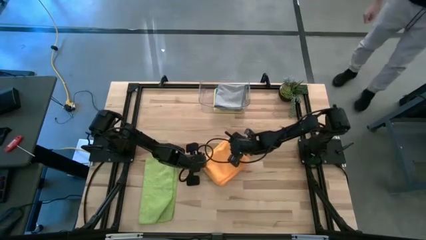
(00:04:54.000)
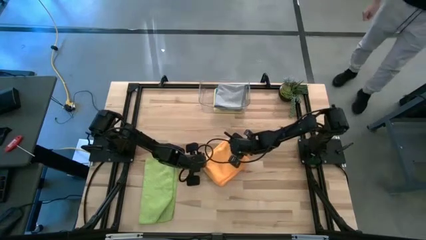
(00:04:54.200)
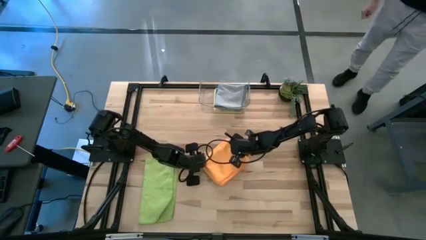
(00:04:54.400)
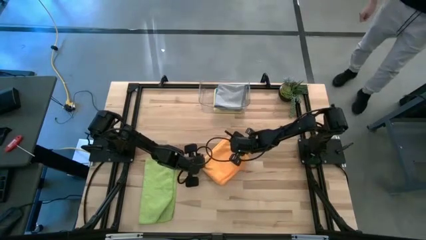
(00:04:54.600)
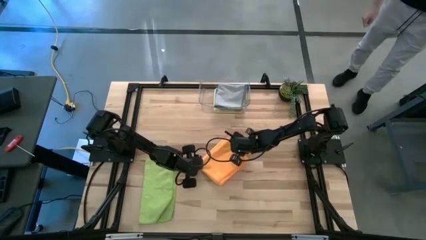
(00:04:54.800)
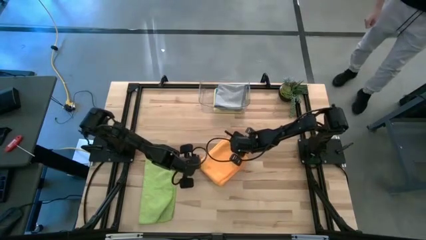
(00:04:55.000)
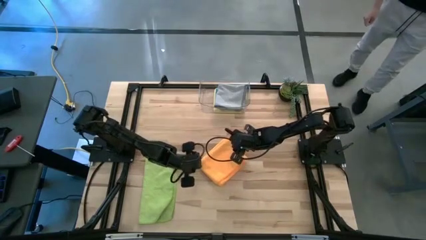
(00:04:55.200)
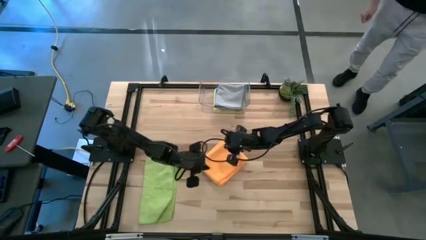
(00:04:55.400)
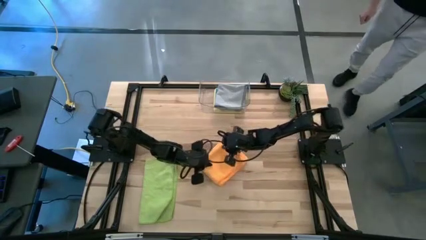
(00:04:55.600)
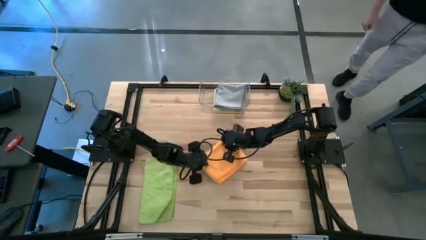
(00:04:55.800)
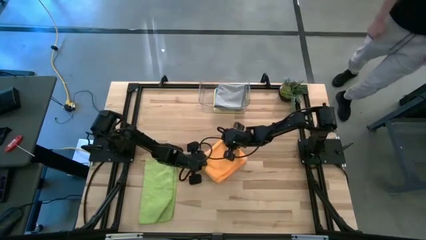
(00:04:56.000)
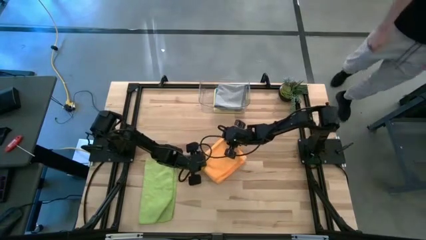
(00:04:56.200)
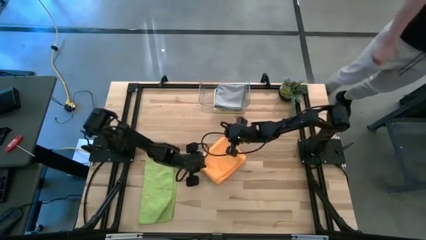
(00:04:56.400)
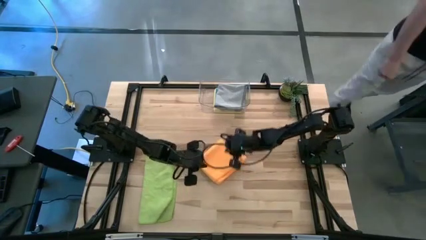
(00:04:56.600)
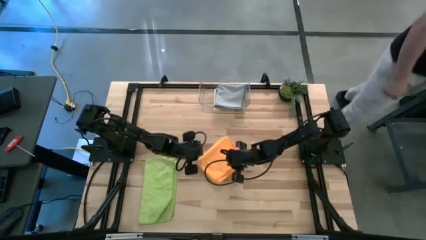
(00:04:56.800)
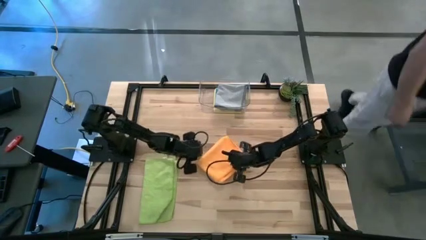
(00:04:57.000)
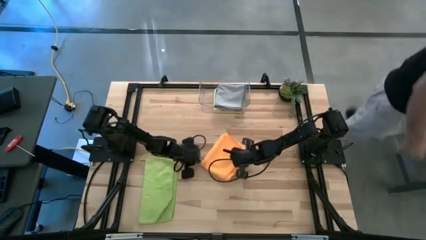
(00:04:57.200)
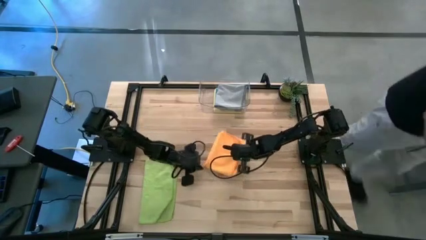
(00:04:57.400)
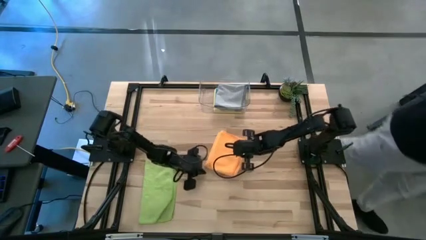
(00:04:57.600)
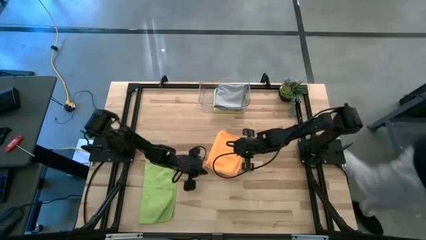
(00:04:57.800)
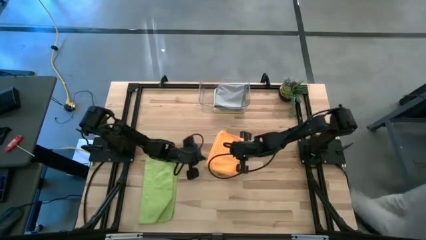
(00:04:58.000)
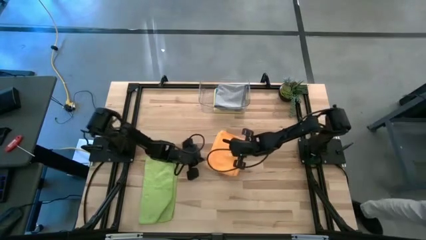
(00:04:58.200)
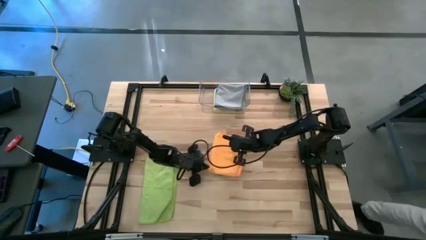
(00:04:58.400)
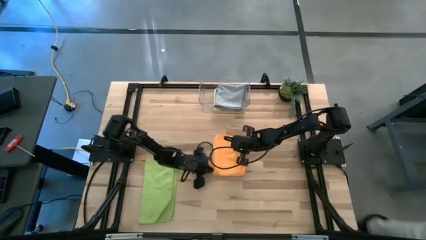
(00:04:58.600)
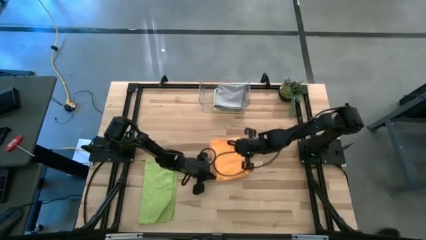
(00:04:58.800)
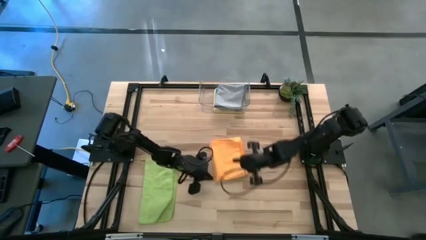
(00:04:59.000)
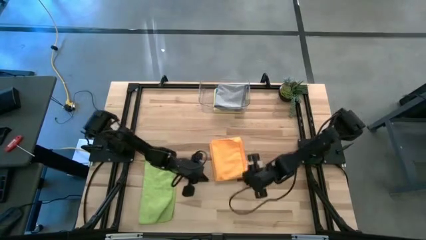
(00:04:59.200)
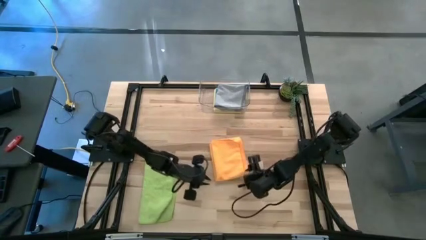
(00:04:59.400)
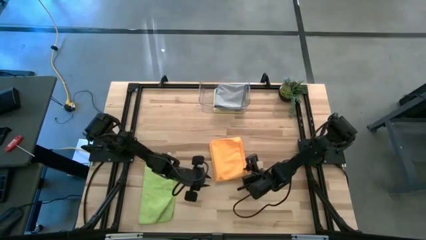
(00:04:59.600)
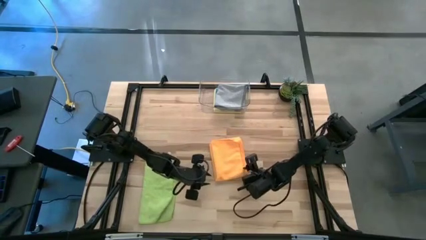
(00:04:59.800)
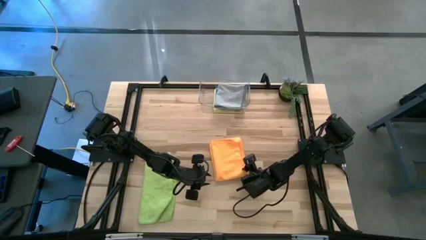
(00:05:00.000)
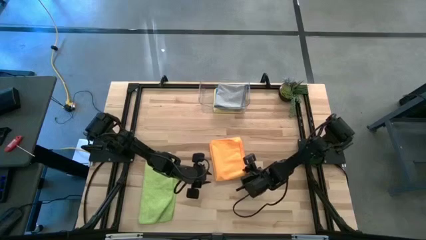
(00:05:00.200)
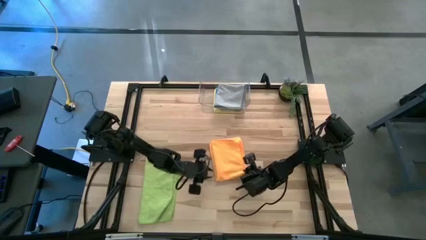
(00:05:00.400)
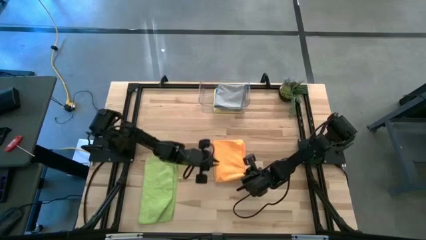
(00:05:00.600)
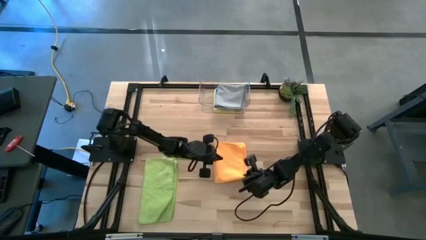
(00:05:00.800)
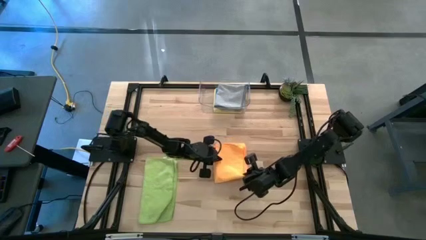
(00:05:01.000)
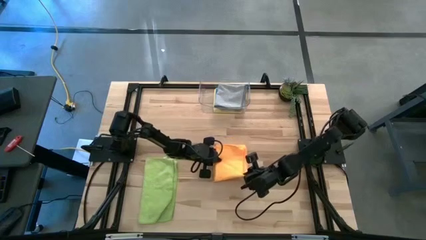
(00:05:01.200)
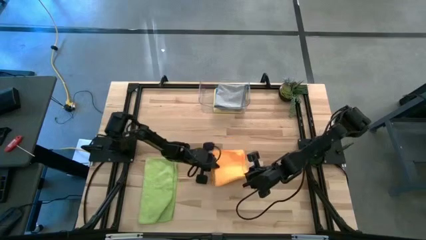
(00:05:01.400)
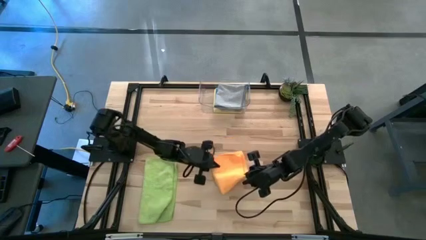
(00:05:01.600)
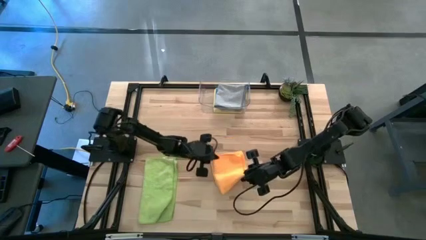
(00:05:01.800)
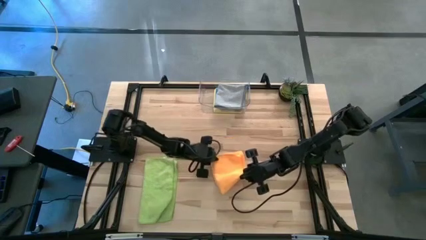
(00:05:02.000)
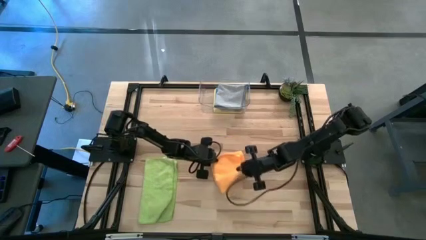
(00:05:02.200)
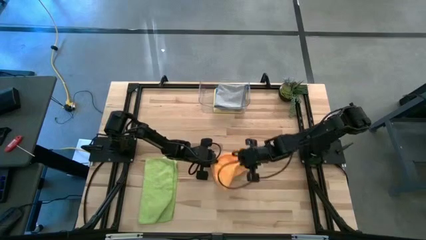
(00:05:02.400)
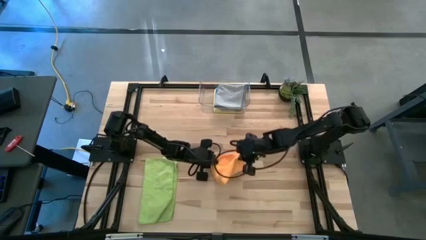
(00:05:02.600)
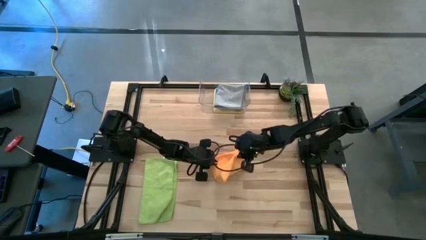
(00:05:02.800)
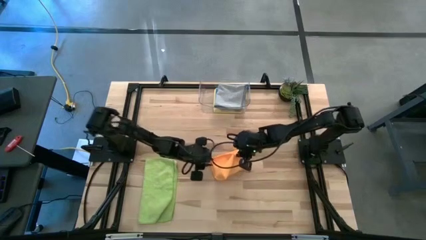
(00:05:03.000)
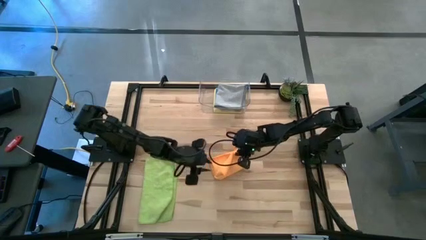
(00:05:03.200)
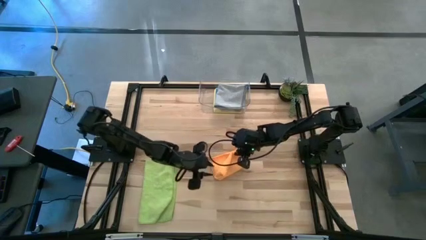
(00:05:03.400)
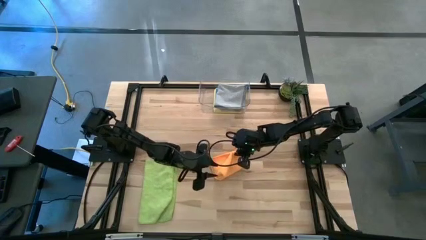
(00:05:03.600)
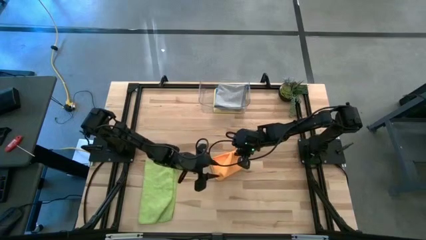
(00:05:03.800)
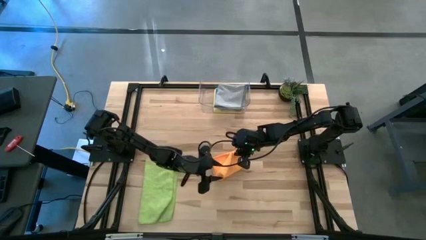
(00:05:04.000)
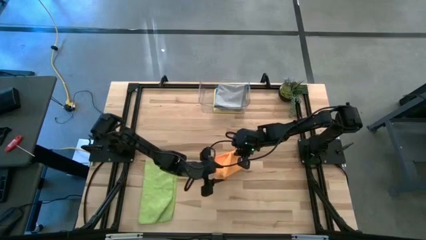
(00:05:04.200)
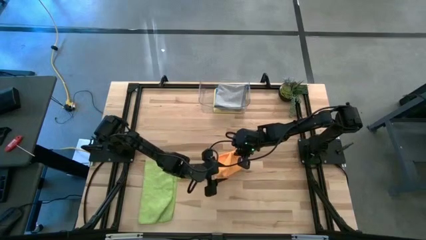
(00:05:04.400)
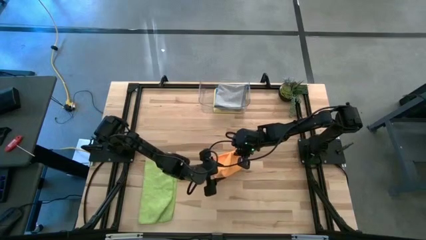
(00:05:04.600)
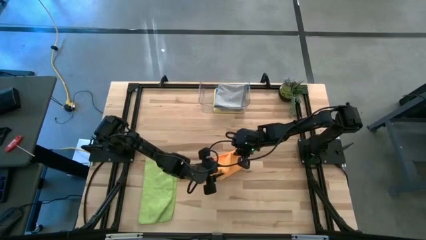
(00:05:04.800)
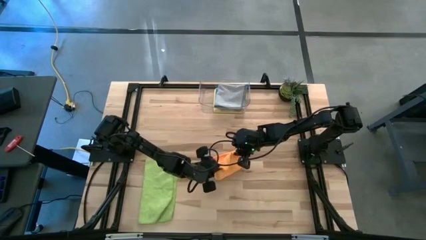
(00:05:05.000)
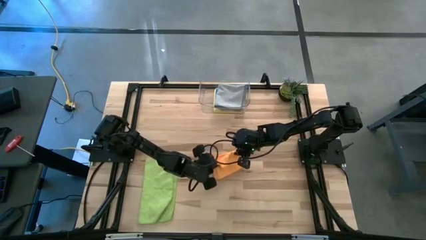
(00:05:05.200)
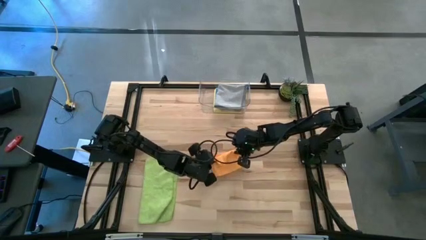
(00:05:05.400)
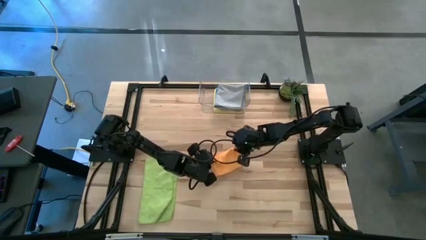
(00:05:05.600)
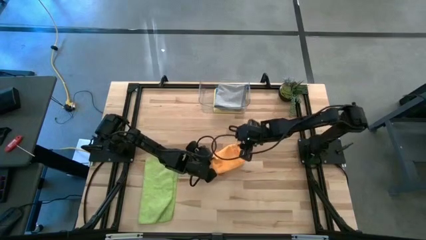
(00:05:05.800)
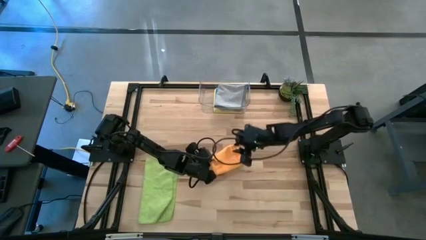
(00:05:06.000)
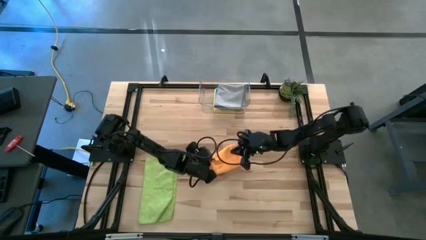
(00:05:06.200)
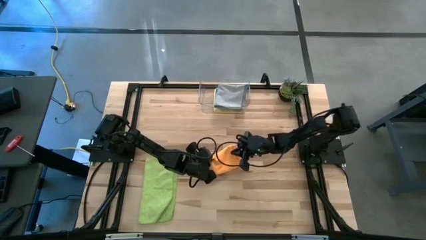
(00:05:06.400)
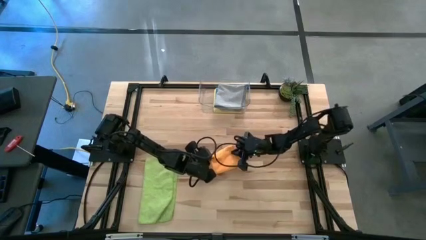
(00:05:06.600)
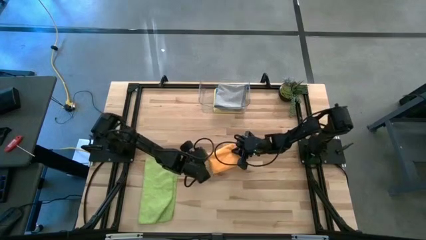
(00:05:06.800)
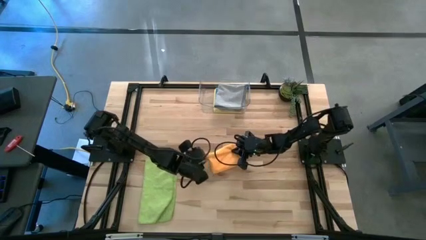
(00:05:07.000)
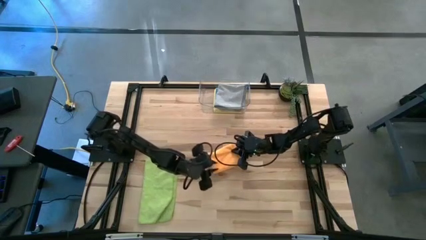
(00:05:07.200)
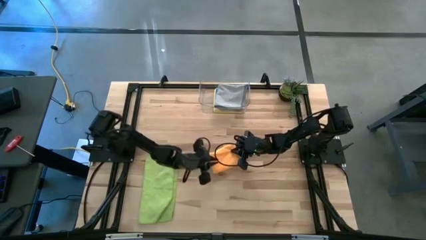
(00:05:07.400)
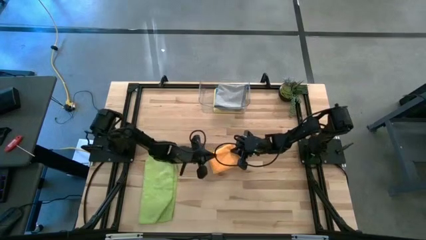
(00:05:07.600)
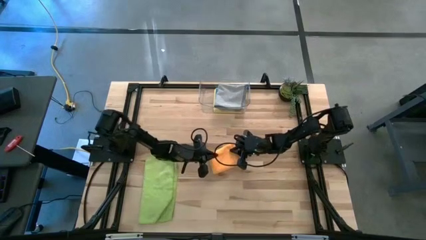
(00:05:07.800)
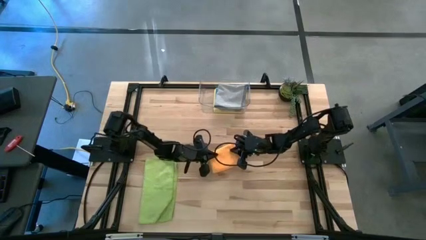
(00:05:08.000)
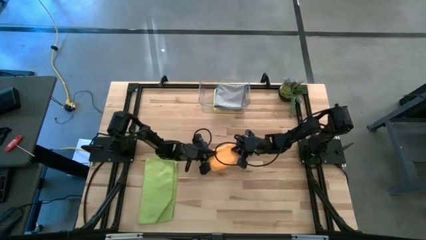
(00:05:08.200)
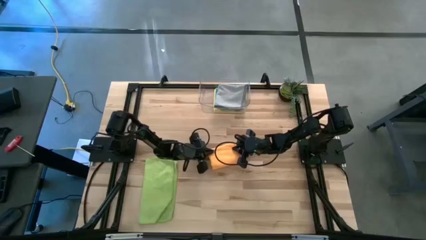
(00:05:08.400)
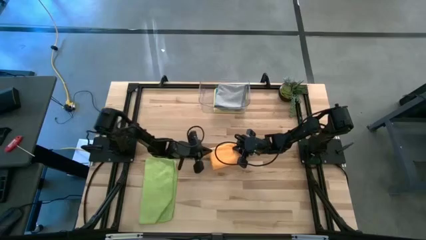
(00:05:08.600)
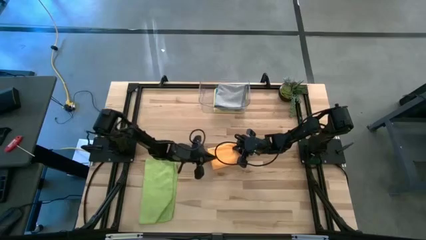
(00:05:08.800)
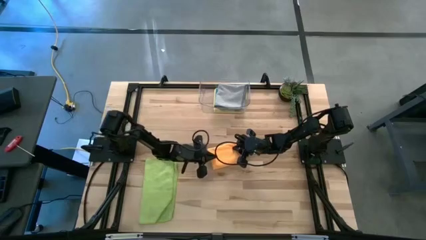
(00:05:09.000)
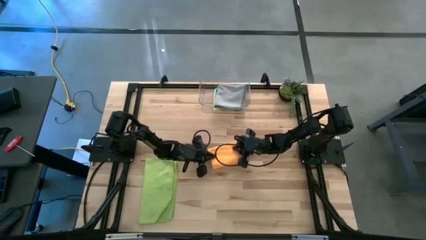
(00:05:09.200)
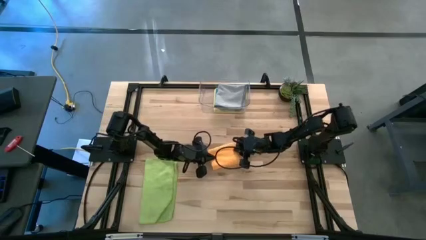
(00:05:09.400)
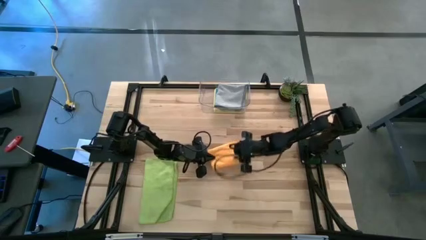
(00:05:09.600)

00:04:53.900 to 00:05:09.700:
Task: Fold microfiber towels
Fold the orange towel on the table
